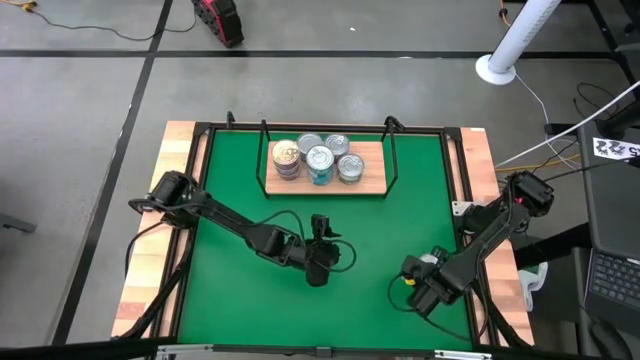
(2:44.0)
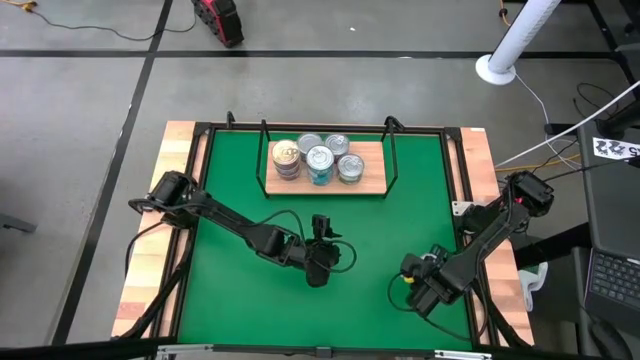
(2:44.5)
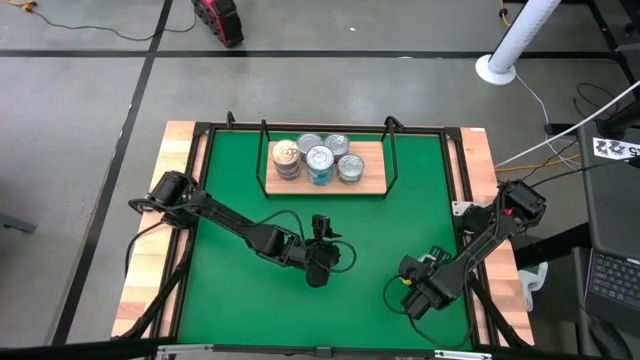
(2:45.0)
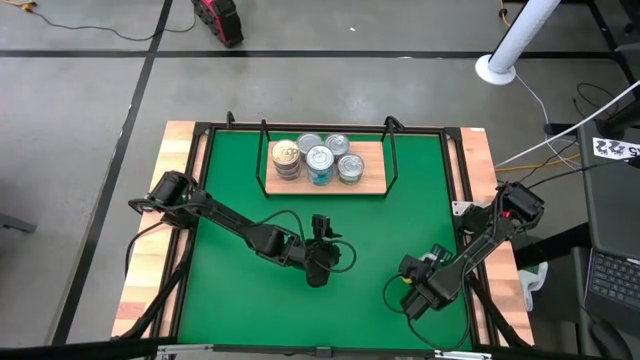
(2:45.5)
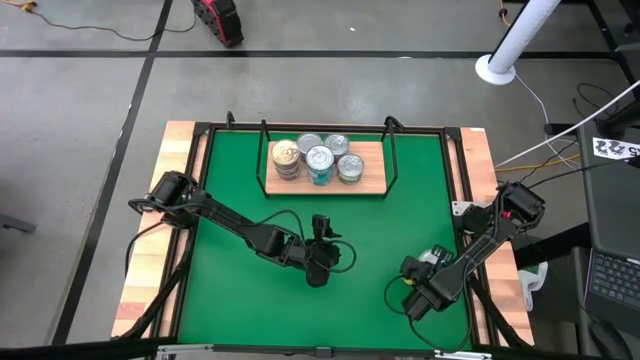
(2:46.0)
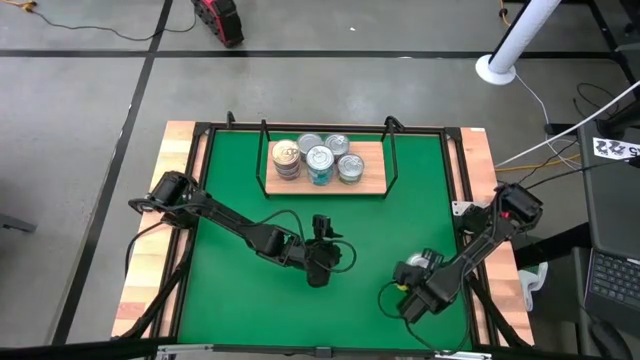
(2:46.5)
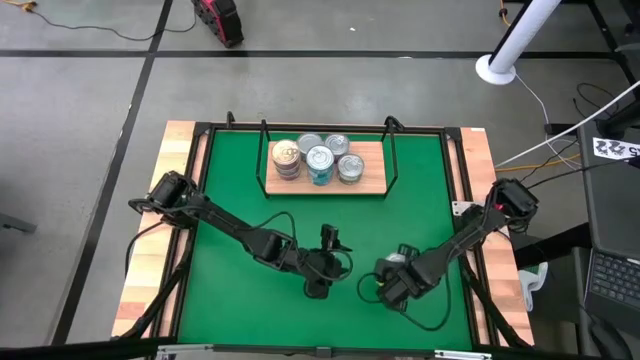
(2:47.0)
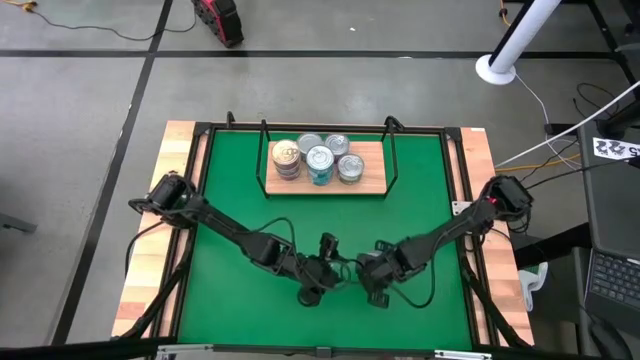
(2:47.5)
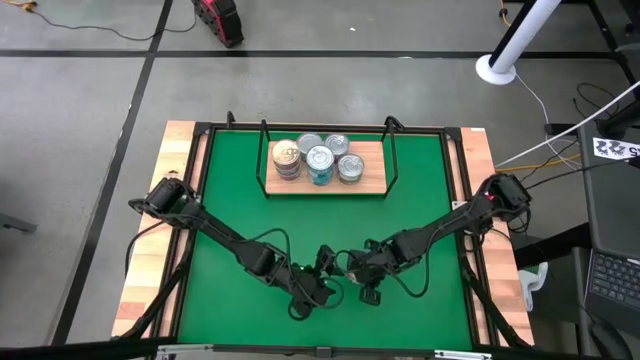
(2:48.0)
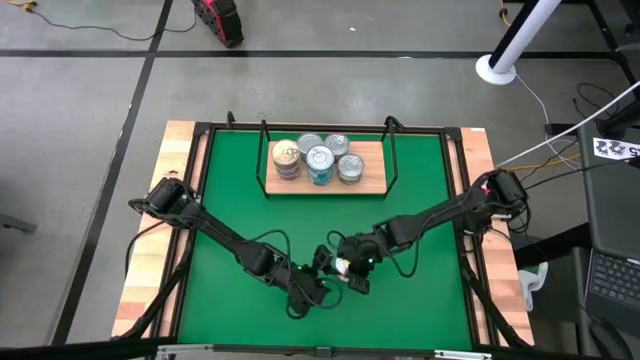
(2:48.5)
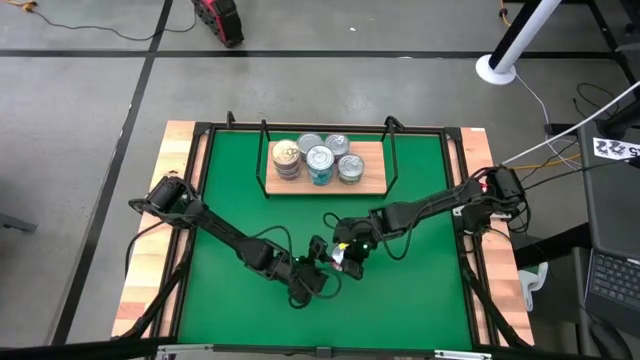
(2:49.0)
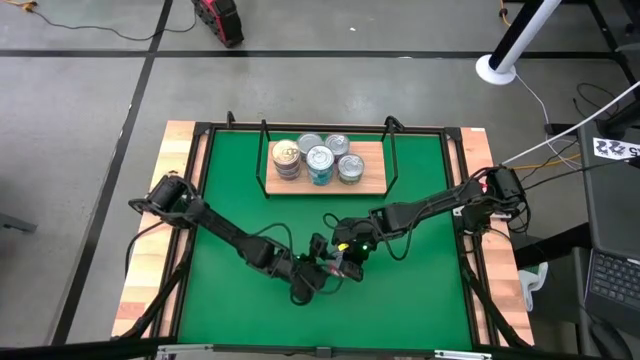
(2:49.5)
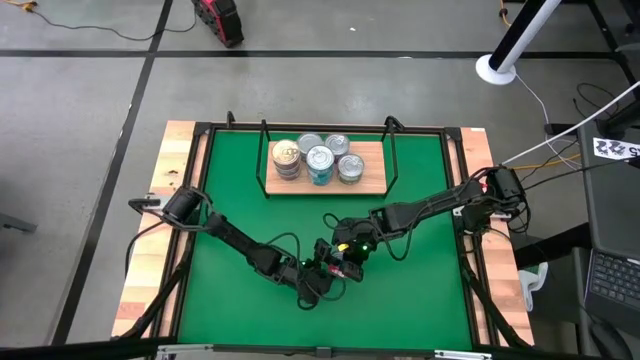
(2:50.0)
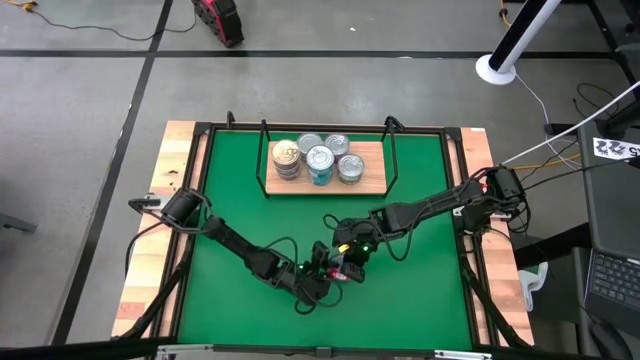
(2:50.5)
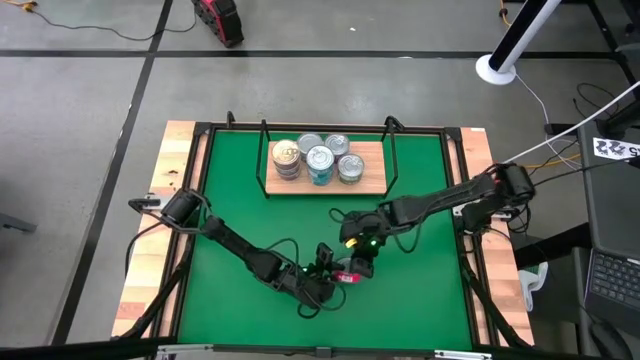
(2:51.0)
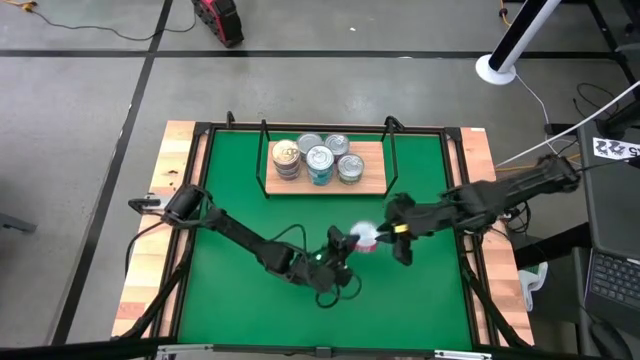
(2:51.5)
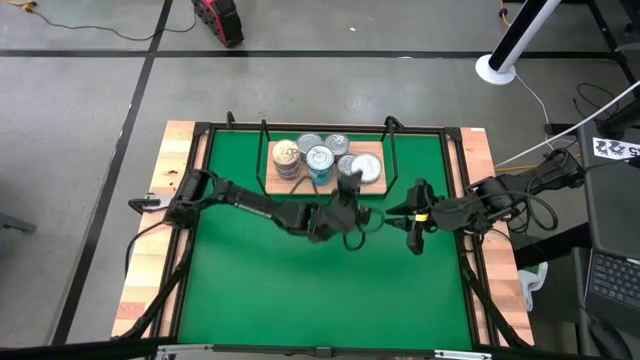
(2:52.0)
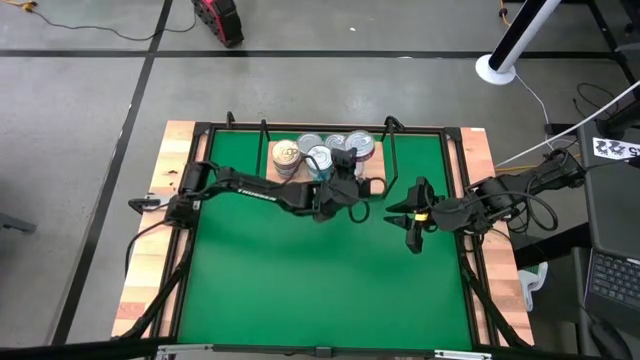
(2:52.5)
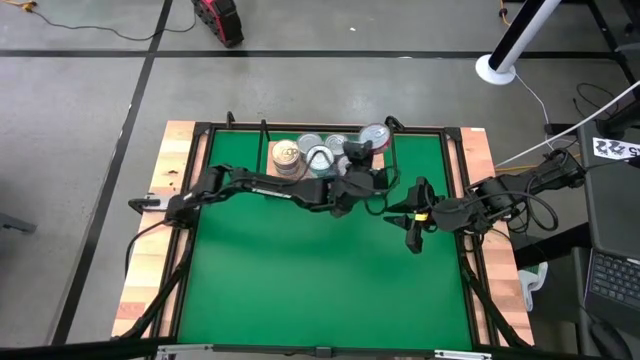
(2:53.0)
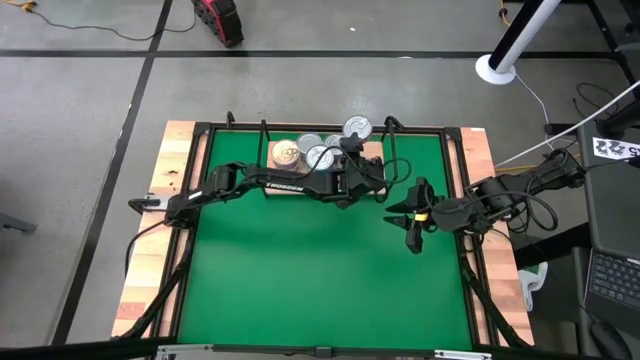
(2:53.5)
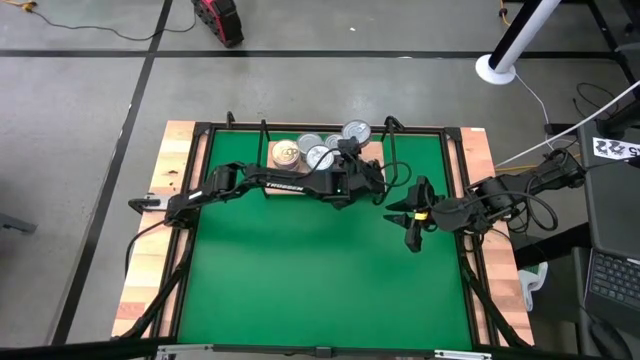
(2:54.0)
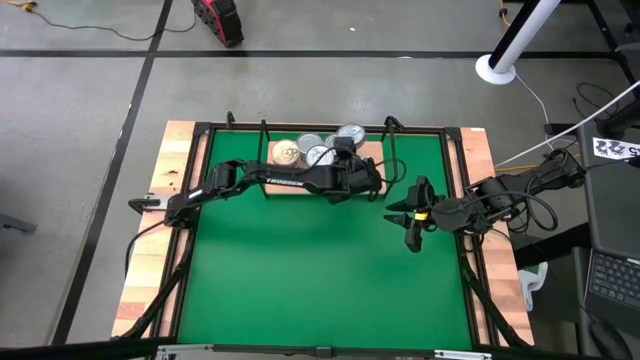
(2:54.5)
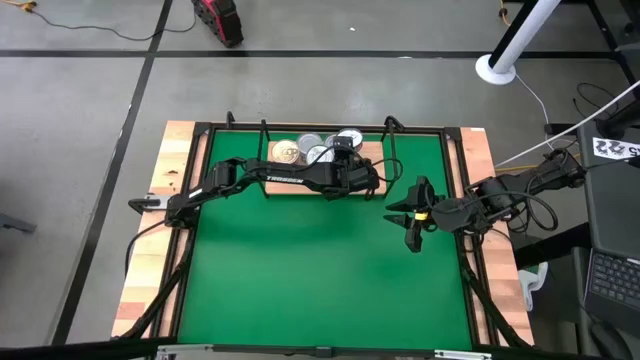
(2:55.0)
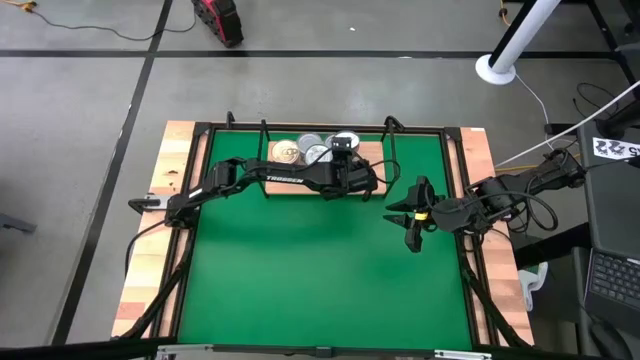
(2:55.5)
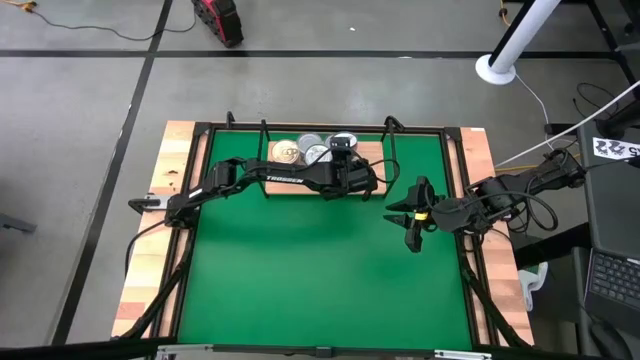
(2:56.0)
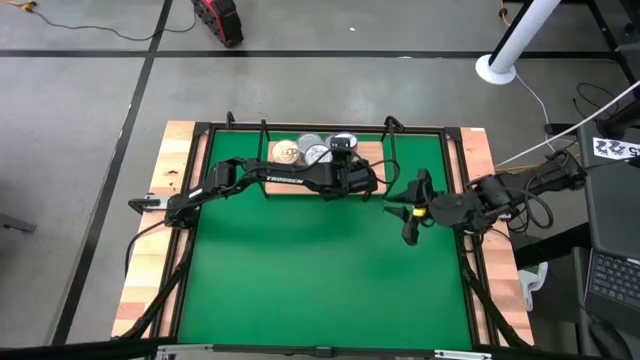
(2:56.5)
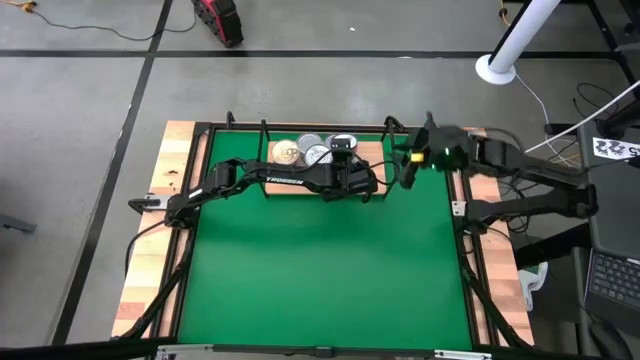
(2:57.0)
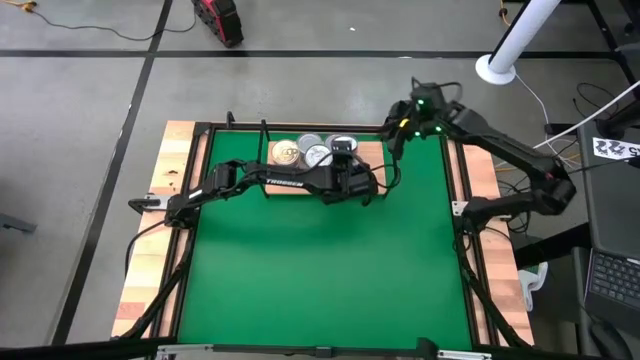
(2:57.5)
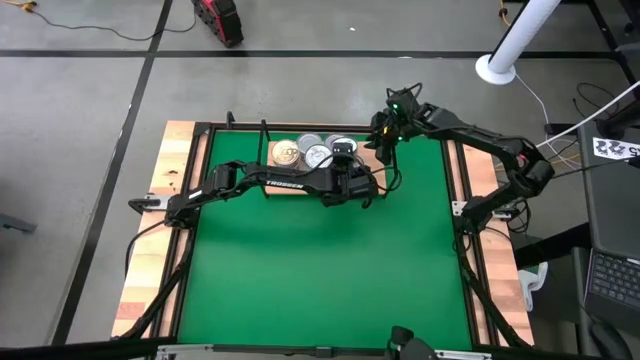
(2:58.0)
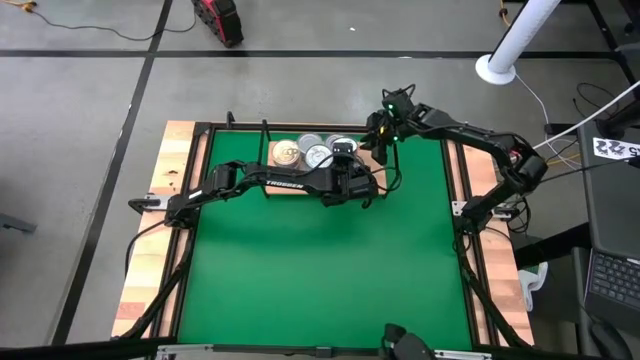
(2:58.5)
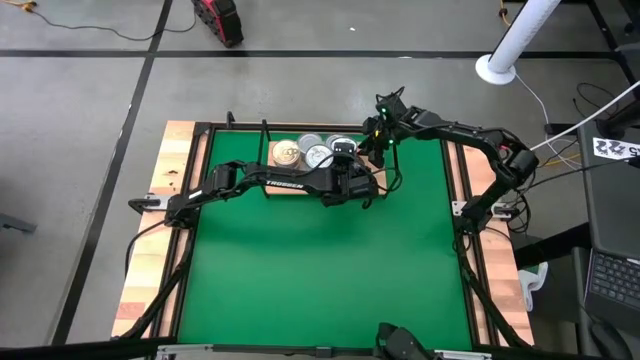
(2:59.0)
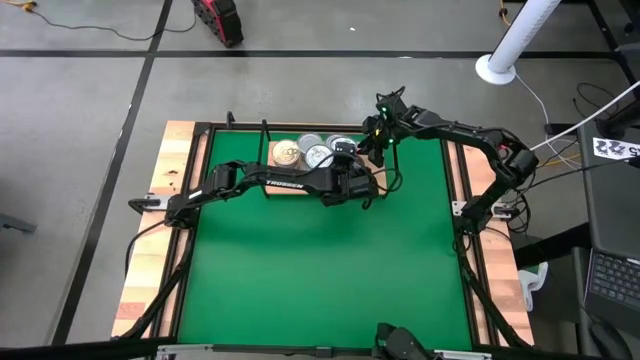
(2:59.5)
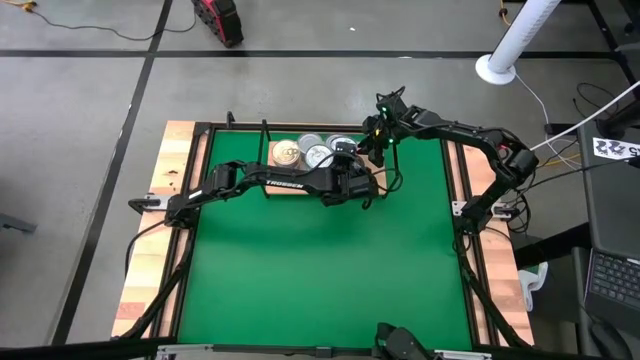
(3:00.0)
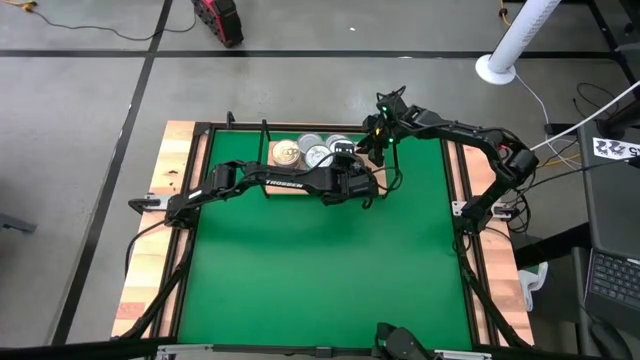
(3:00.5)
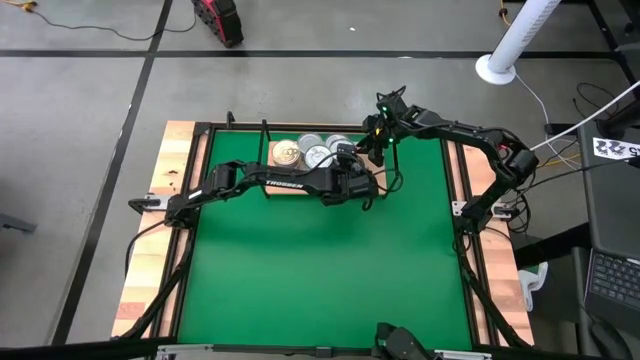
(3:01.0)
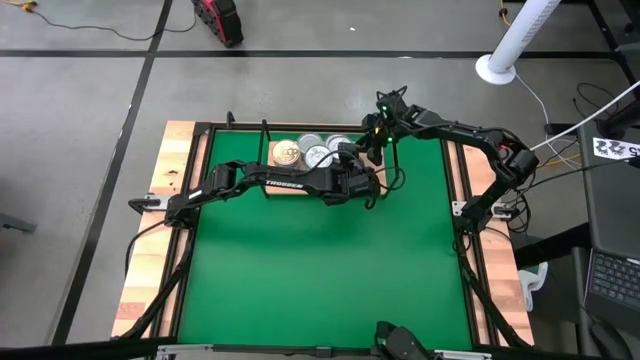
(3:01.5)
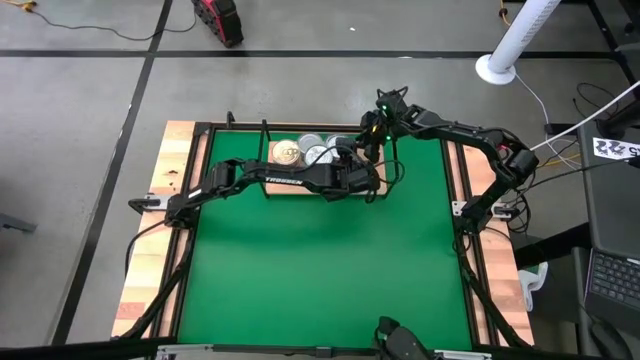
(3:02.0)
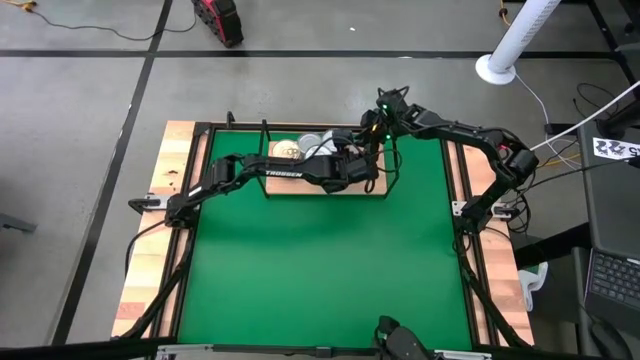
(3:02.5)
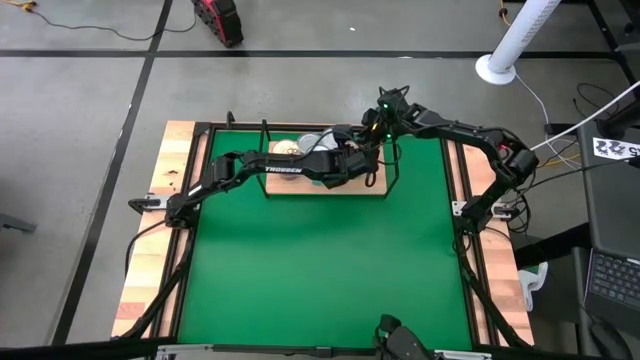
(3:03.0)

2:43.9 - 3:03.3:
Task: Stack canned seafood by type on shelf
Stack the red tuna can on top of the other red tuna cans on the shelf

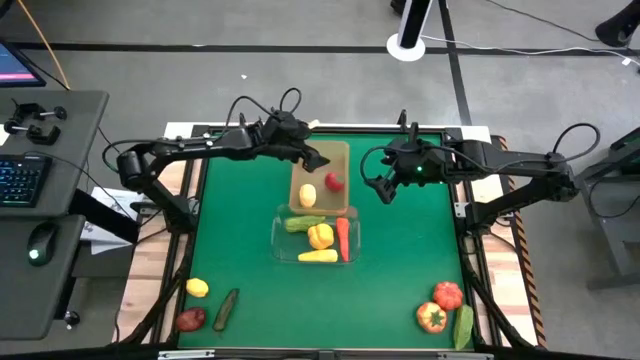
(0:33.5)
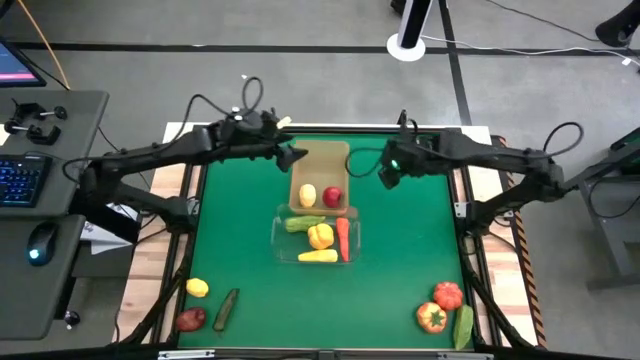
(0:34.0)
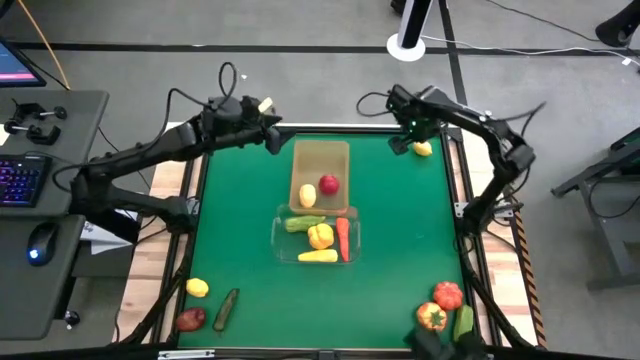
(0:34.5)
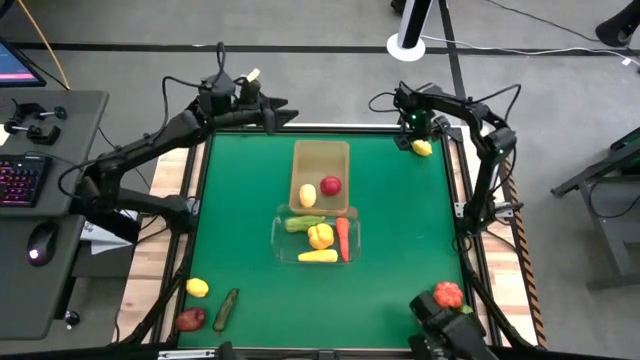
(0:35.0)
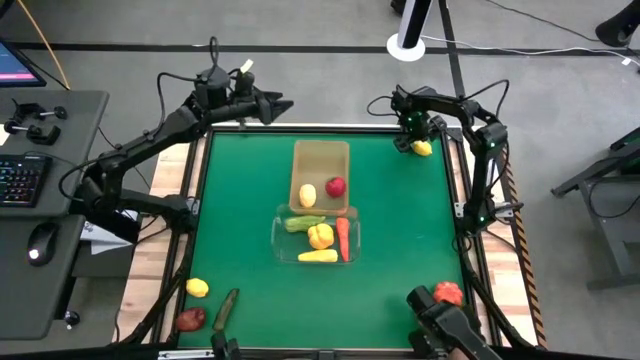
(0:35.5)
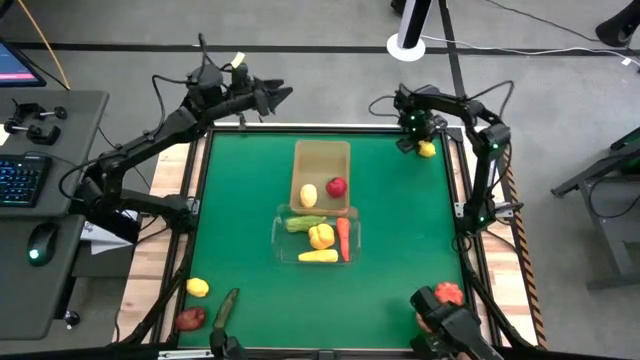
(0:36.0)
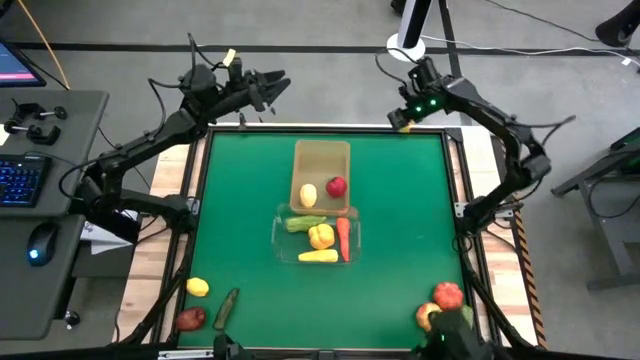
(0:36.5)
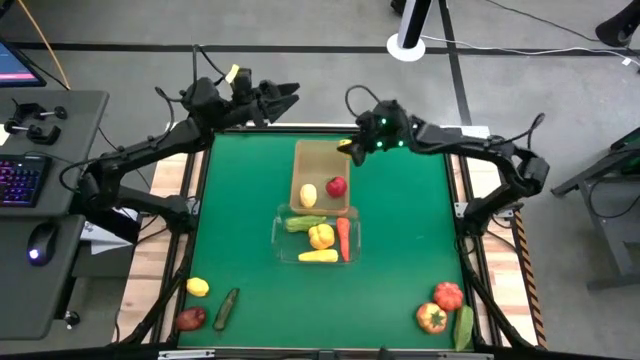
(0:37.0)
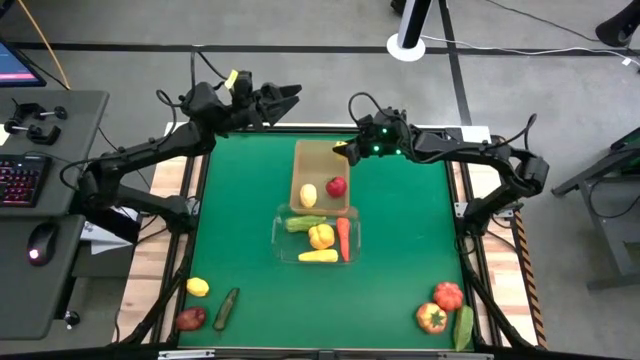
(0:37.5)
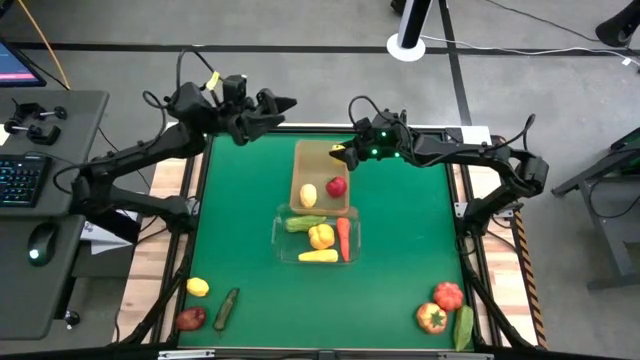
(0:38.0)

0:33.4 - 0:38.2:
Task: Sort produce into baskets
Put the top yellow lemon into the orange bin
